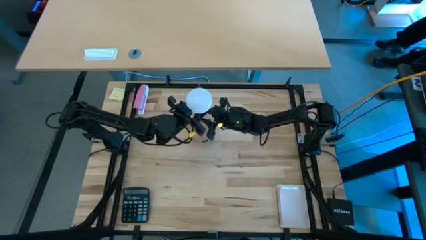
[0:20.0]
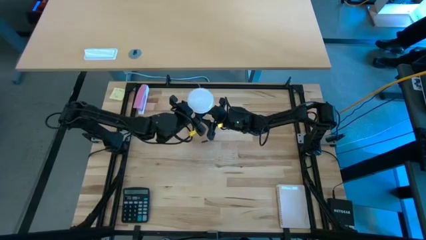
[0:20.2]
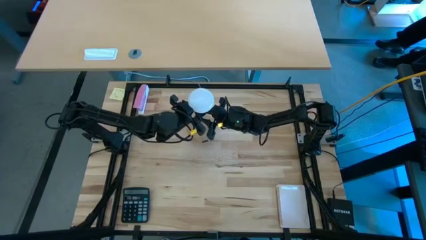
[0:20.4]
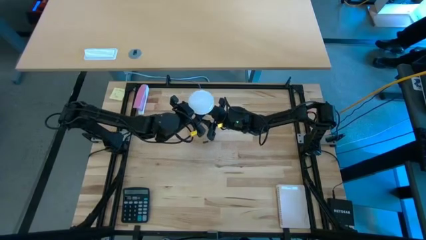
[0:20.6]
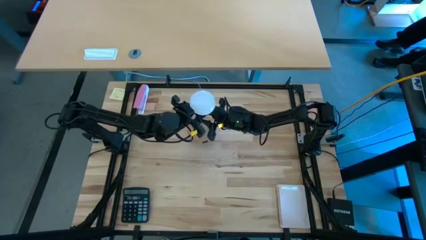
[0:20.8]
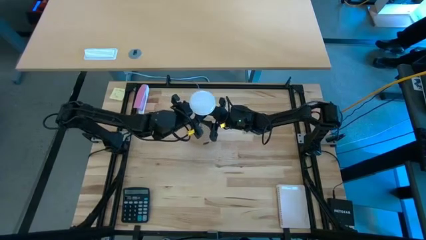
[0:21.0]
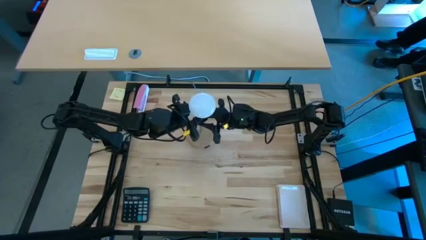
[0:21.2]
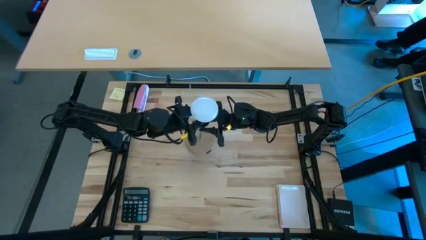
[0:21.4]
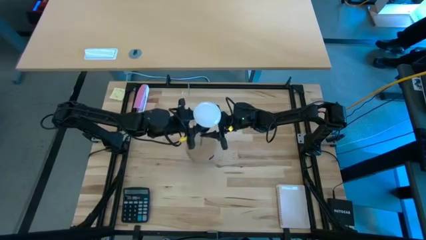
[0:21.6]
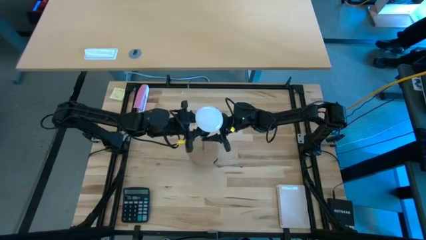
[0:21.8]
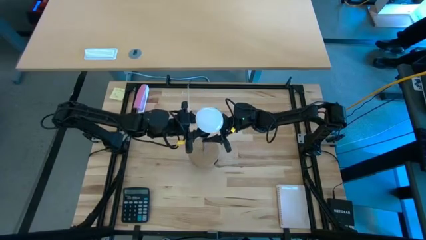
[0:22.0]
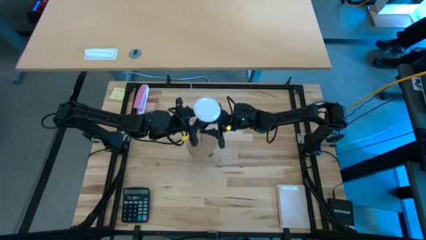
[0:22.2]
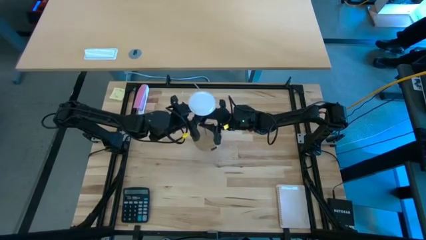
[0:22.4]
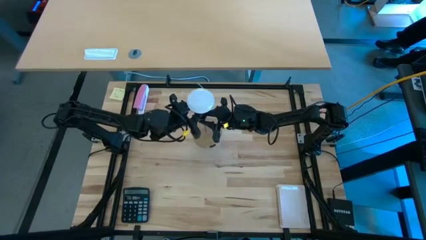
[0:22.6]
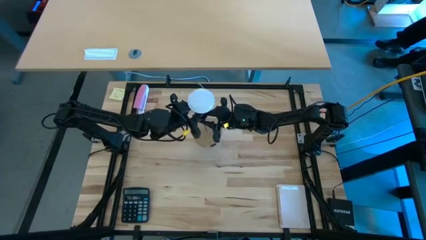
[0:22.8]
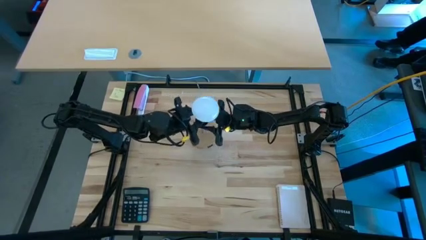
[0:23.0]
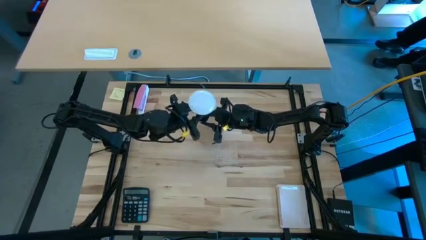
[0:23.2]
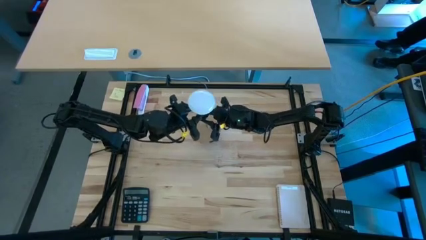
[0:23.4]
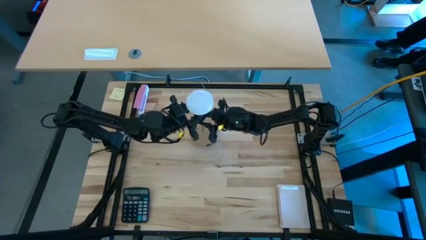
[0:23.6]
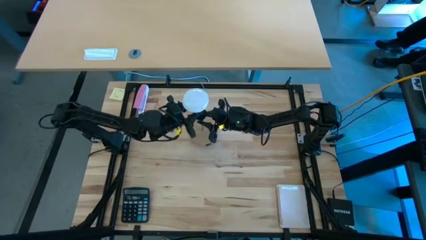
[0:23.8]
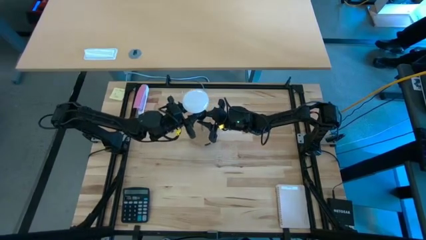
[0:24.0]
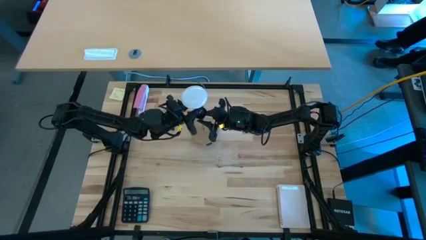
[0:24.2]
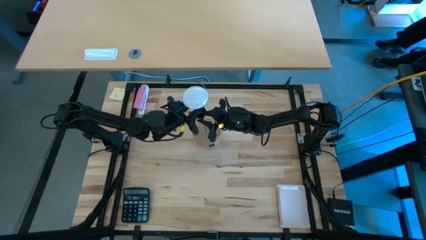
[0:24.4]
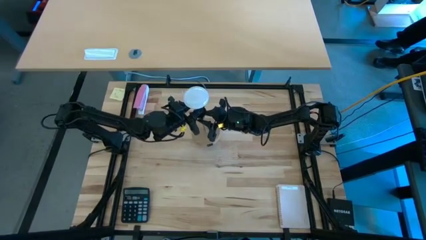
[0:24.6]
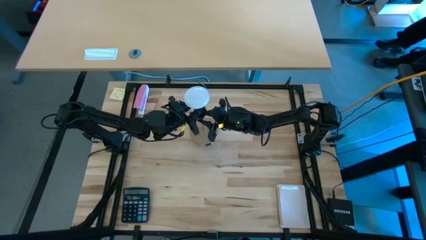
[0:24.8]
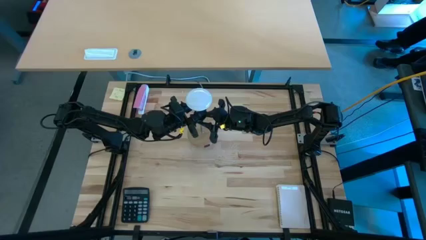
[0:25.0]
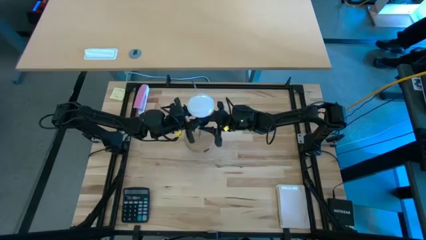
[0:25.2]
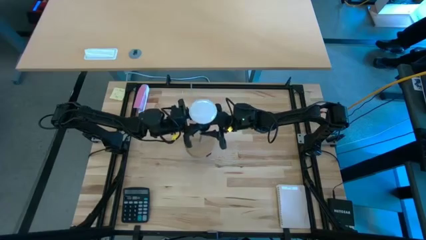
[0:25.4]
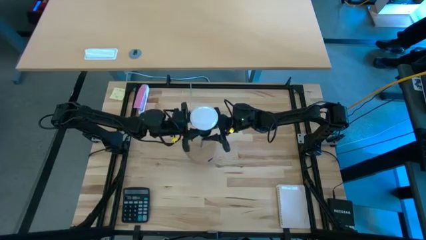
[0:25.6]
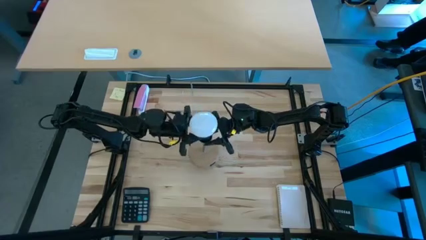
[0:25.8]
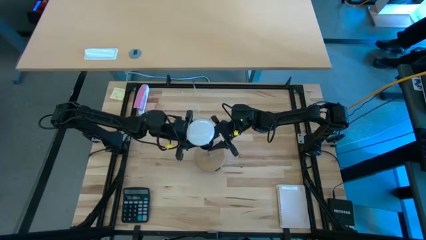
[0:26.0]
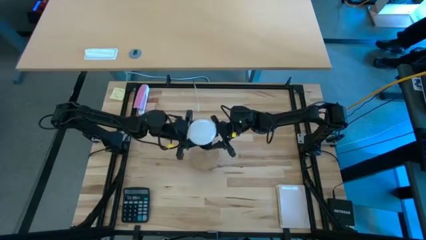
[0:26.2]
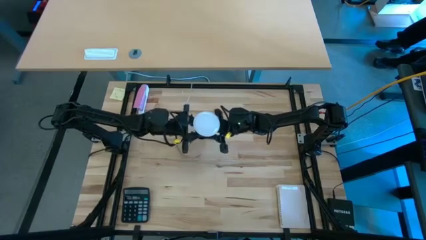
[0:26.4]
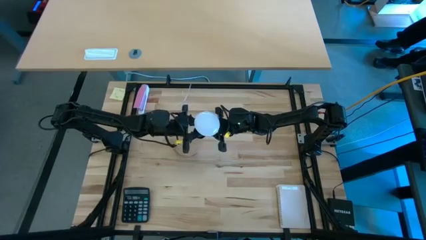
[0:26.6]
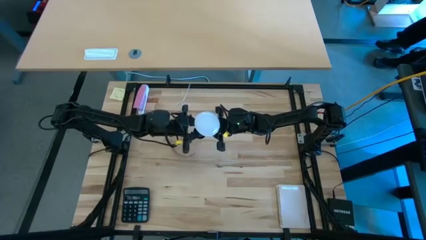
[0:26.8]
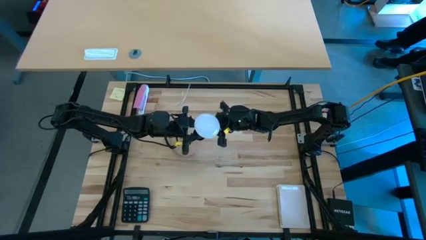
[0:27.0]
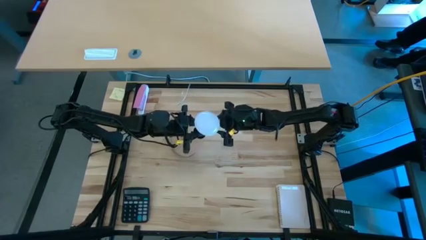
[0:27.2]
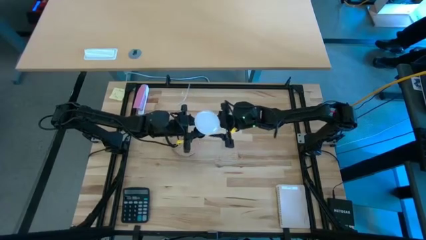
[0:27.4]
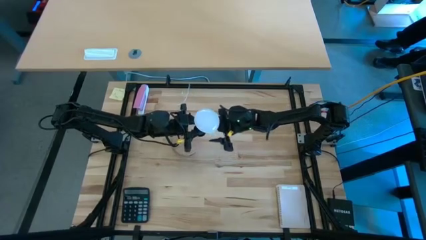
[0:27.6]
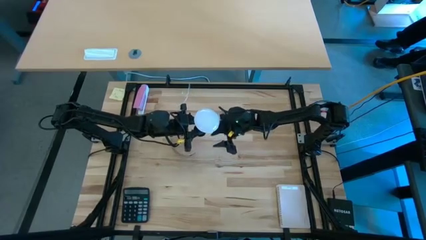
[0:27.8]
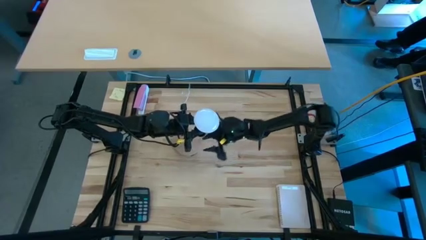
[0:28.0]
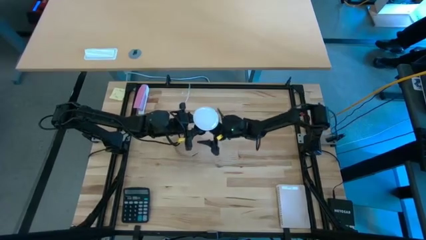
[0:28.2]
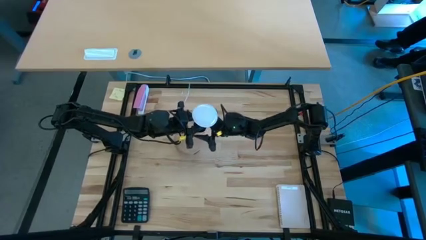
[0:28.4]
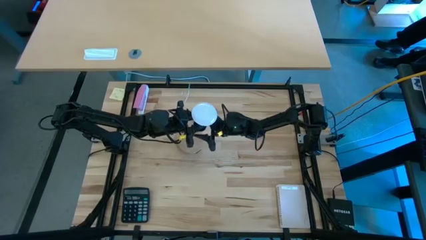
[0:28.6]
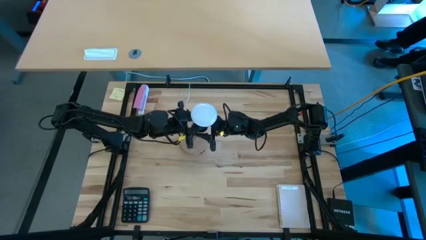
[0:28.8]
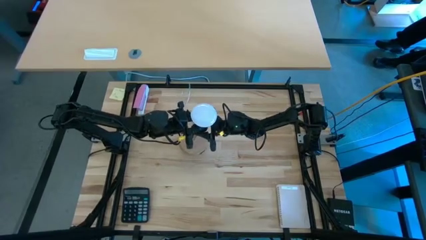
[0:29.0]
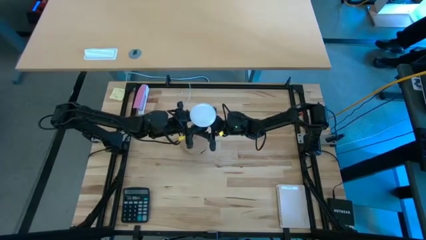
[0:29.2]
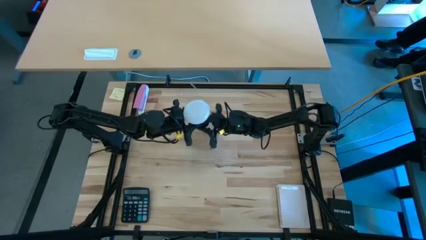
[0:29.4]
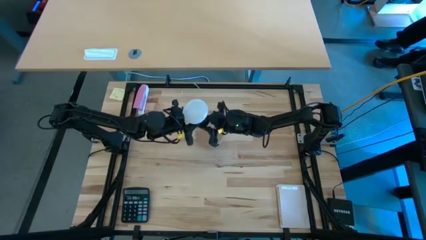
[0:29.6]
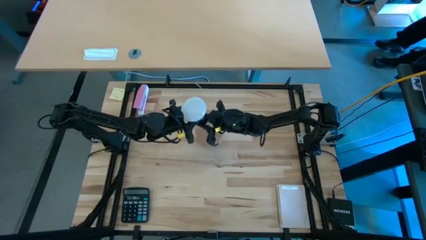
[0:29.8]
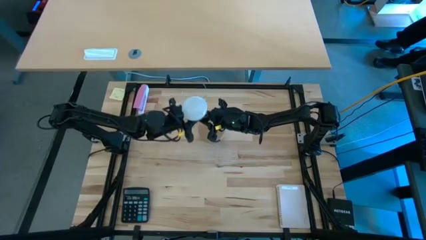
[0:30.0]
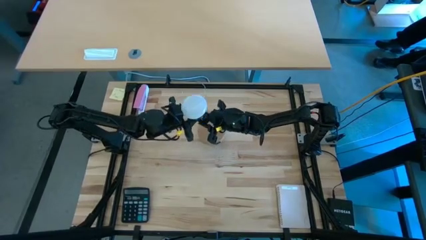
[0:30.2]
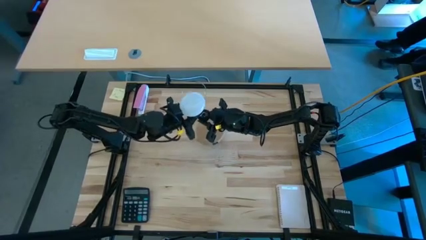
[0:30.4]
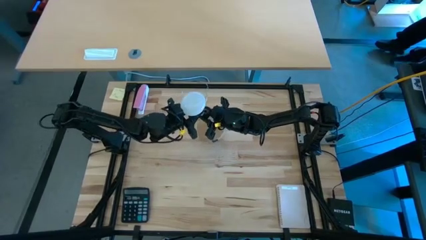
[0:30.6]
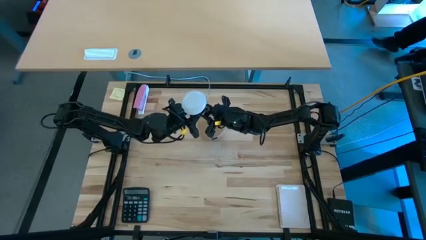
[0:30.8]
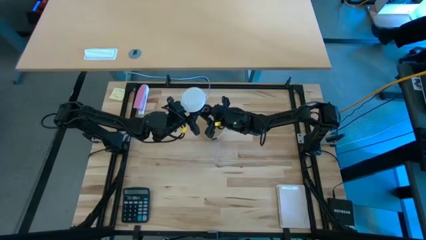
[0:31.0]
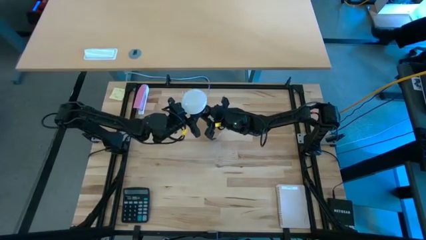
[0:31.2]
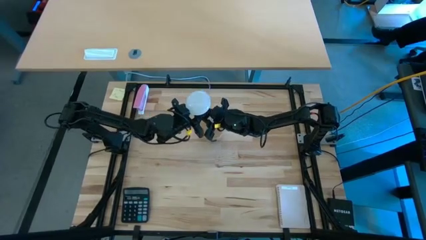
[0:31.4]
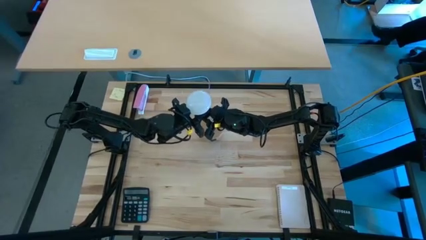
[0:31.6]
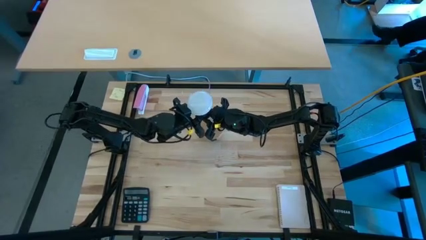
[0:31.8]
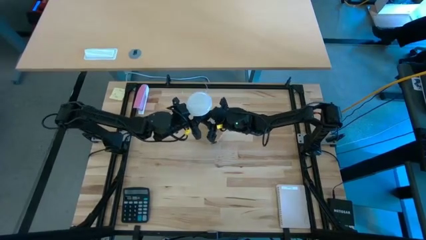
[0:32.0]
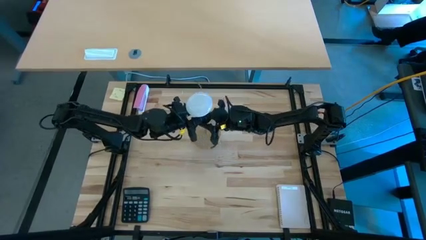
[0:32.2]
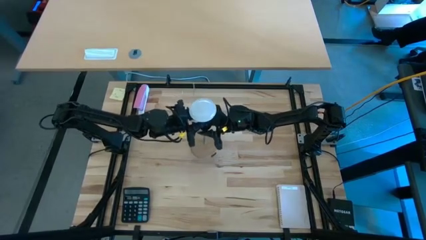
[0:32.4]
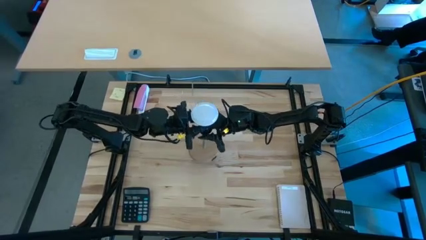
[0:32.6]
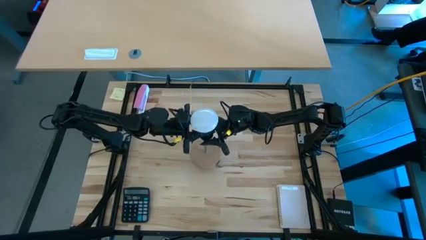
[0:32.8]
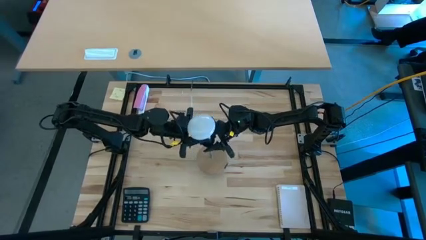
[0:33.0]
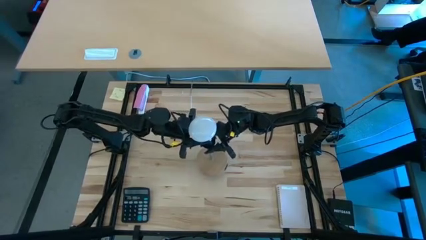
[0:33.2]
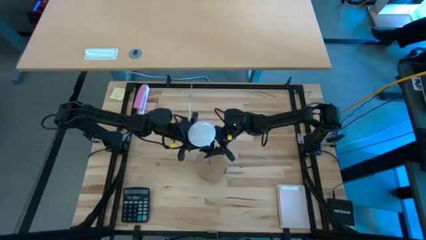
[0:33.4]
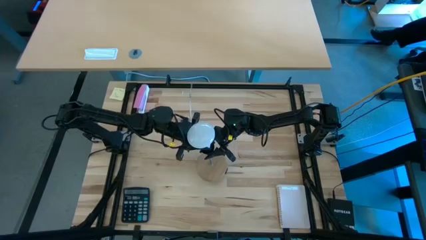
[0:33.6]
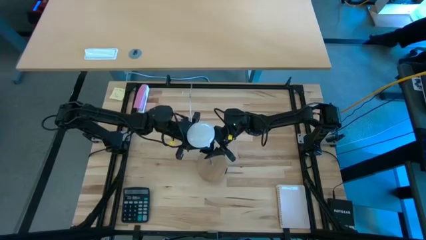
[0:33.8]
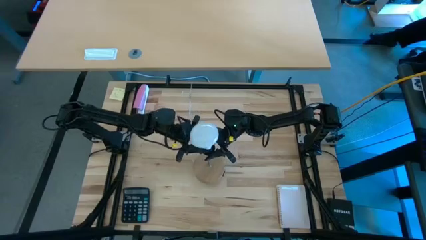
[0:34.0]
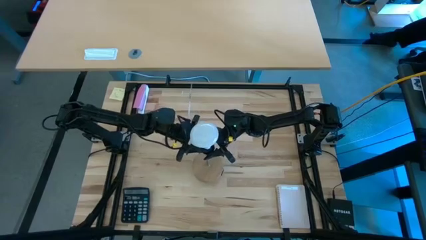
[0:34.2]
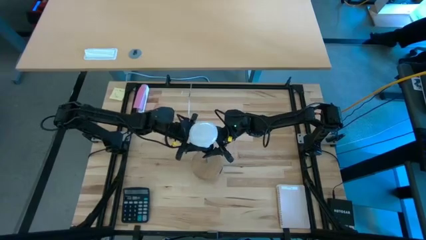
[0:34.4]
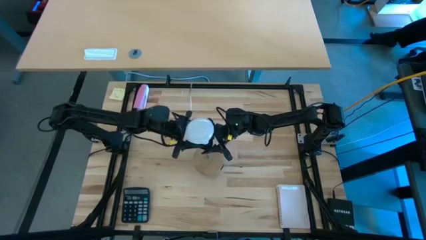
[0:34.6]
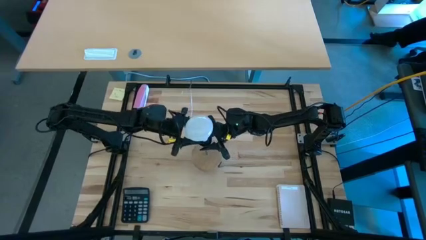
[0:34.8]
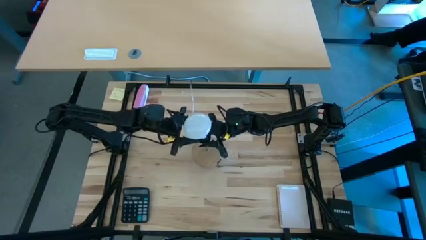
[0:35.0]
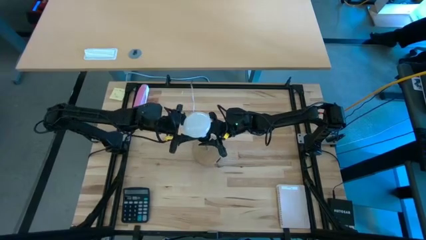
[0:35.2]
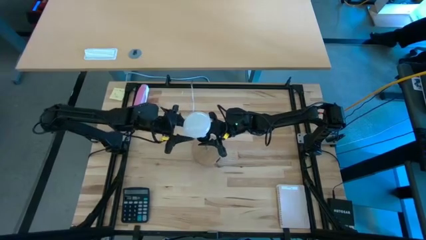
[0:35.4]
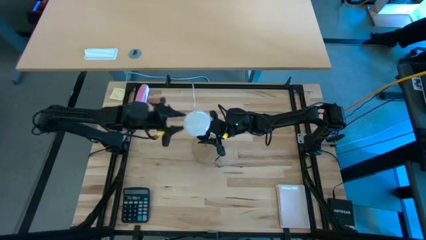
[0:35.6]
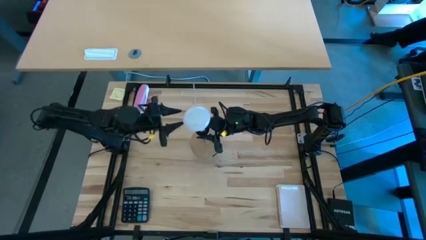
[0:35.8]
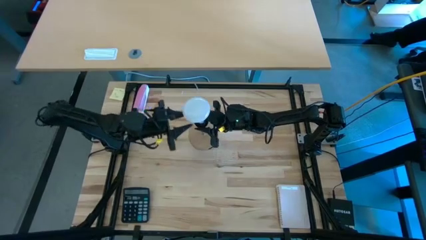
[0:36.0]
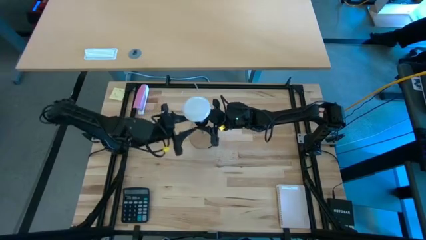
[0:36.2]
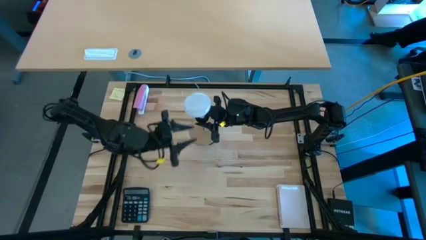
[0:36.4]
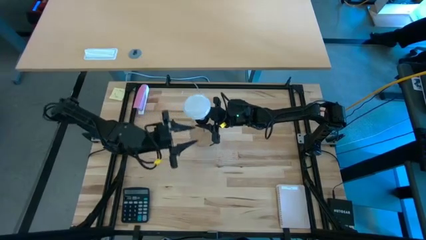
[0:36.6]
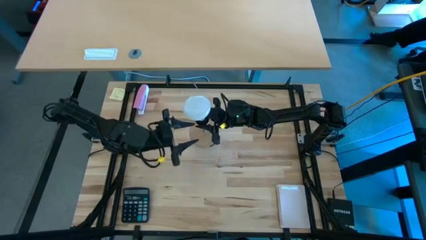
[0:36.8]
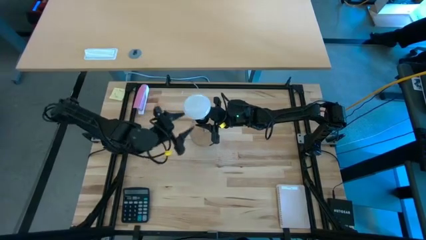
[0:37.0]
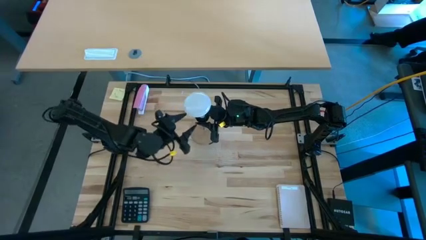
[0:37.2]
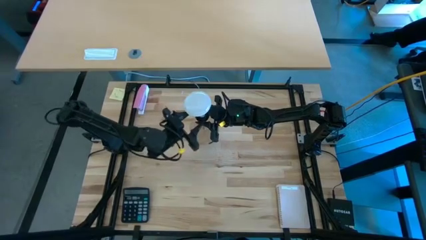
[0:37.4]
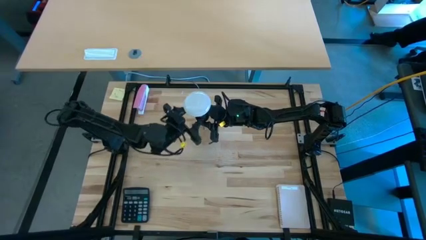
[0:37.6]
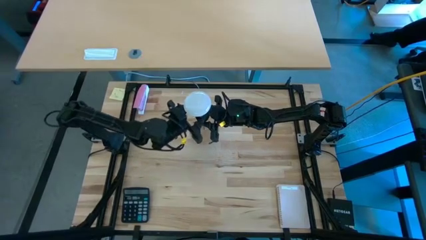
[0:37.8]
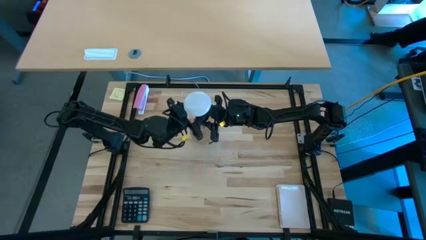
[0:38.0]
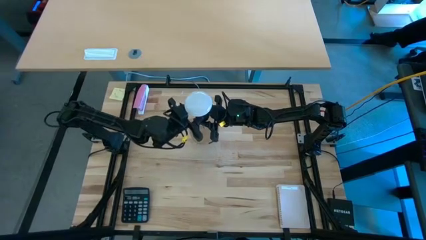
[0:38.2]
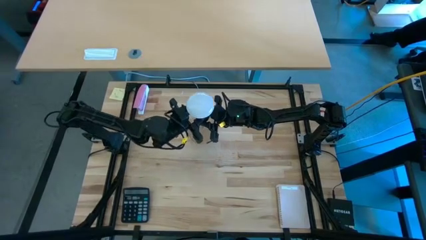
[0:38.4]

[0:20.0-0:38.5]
Task: Screw lightbulb
Insert the lightbulb into the desk lamp
